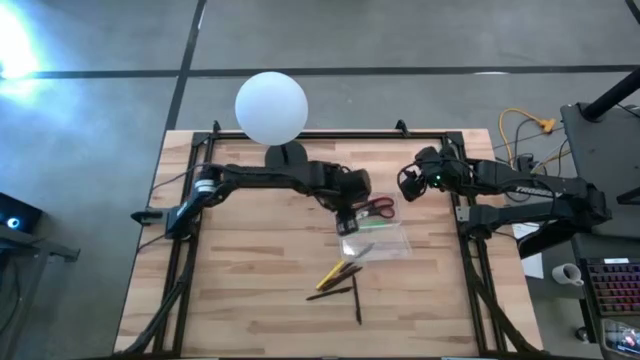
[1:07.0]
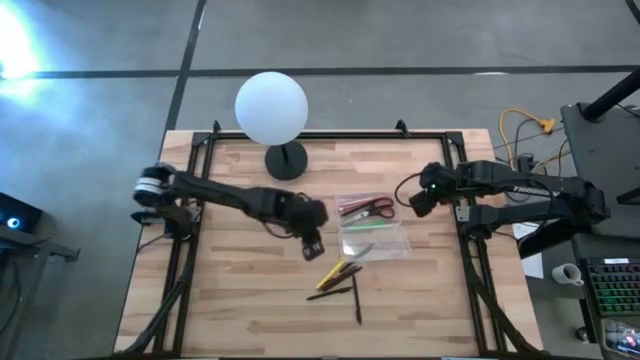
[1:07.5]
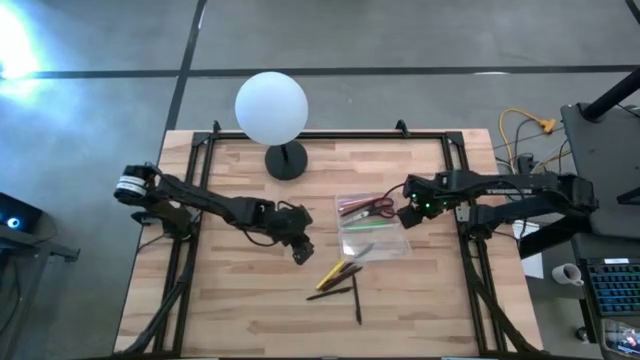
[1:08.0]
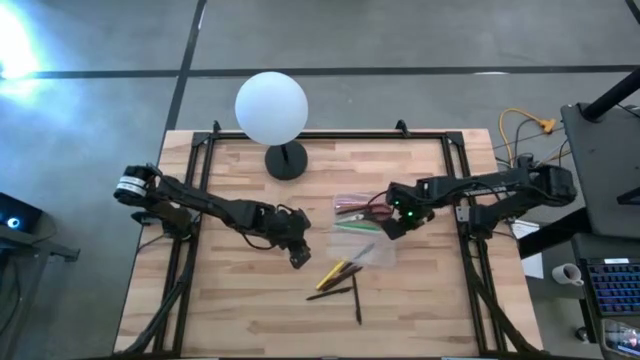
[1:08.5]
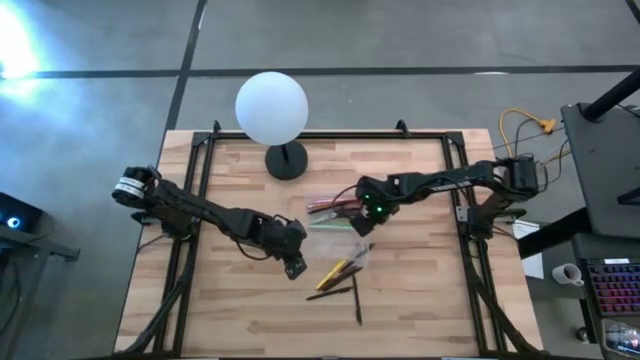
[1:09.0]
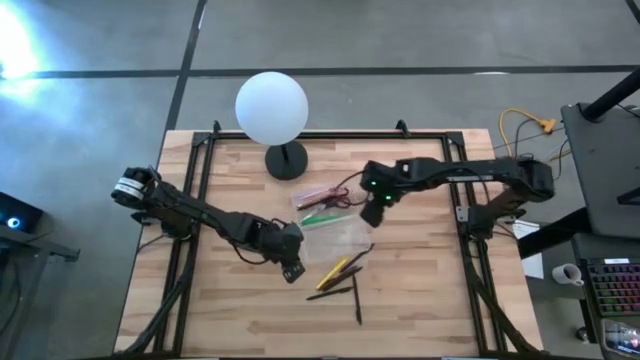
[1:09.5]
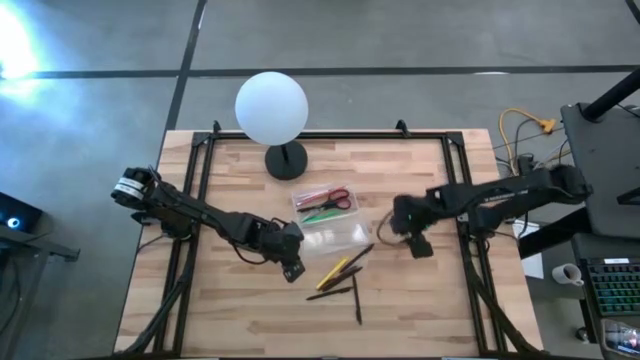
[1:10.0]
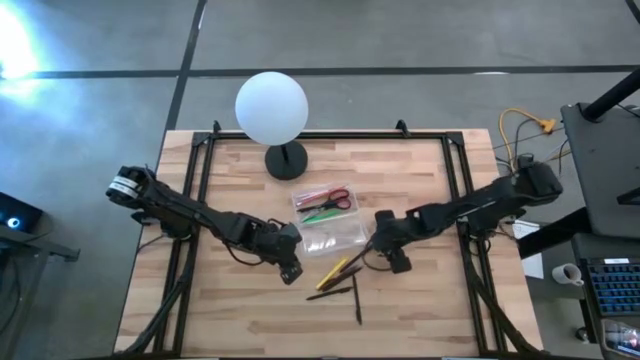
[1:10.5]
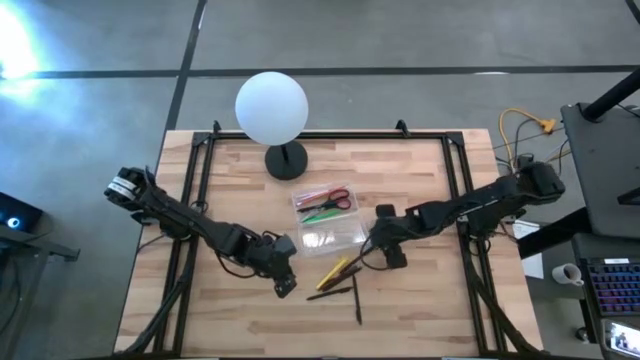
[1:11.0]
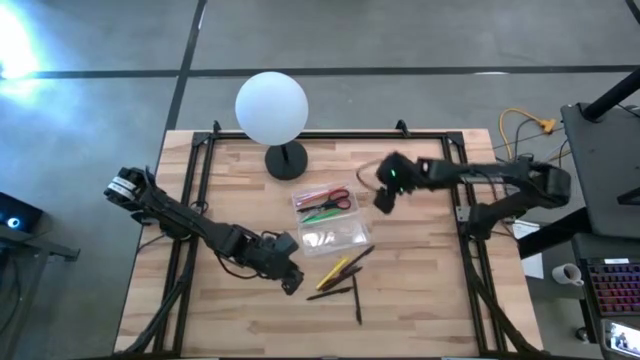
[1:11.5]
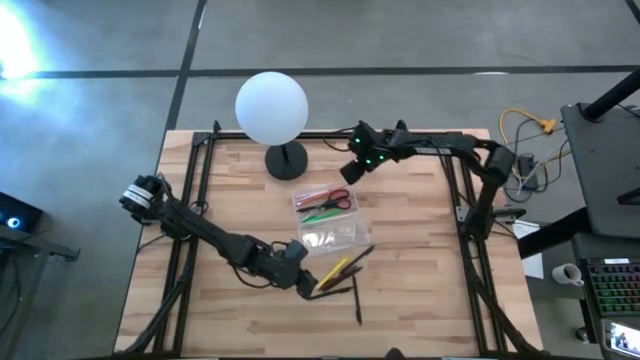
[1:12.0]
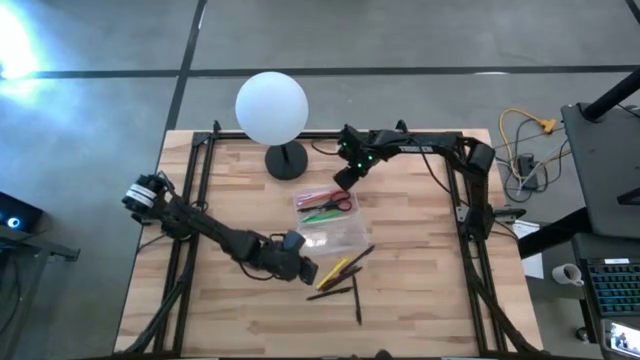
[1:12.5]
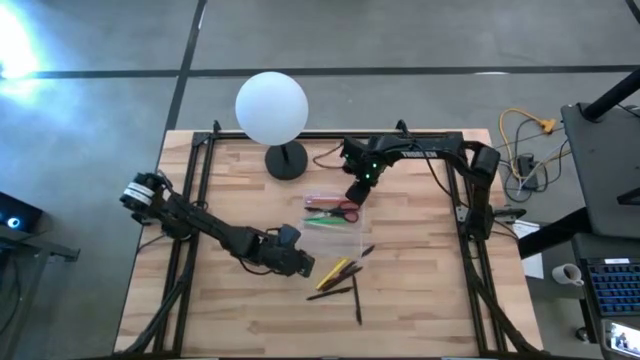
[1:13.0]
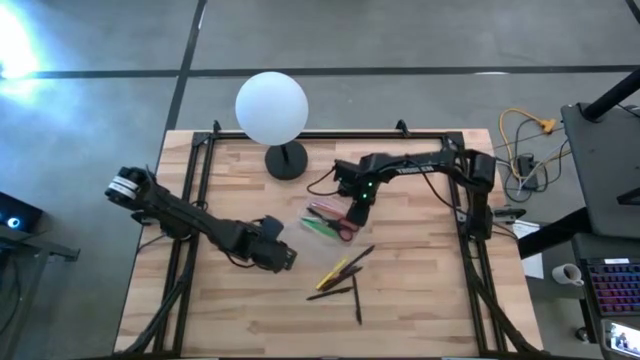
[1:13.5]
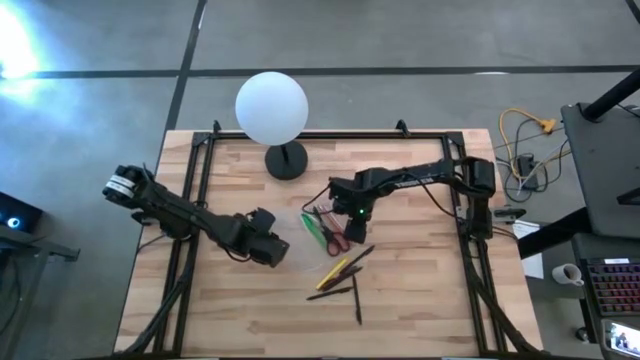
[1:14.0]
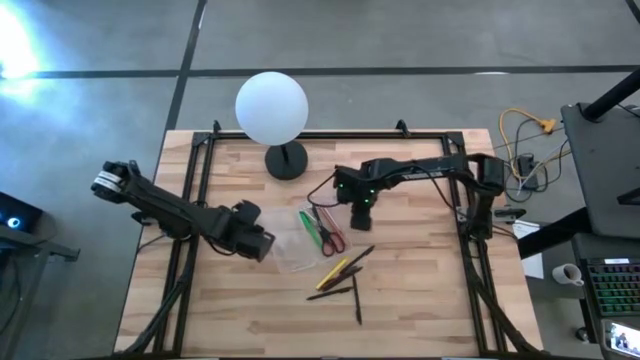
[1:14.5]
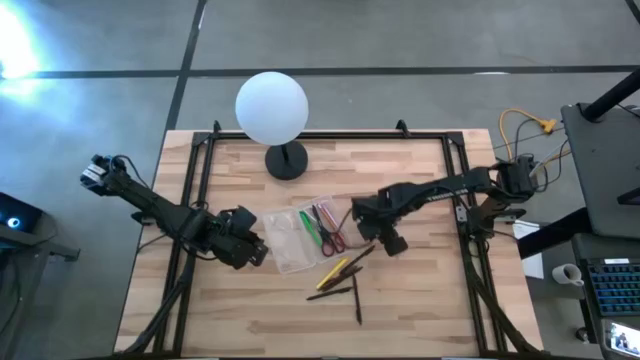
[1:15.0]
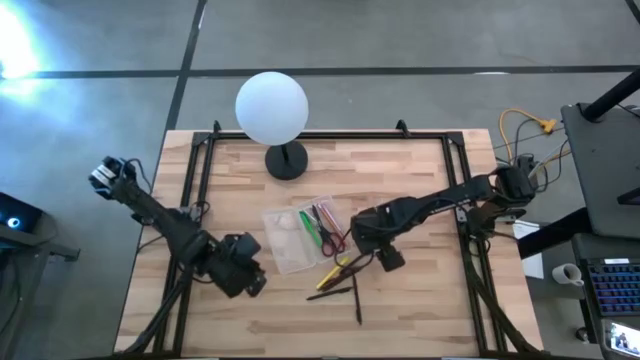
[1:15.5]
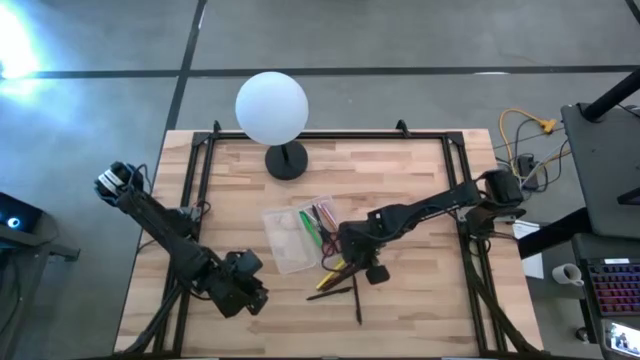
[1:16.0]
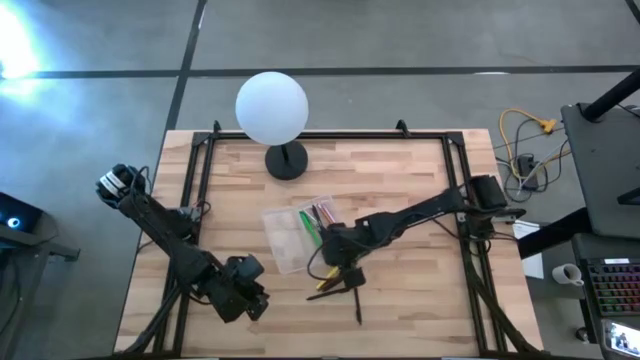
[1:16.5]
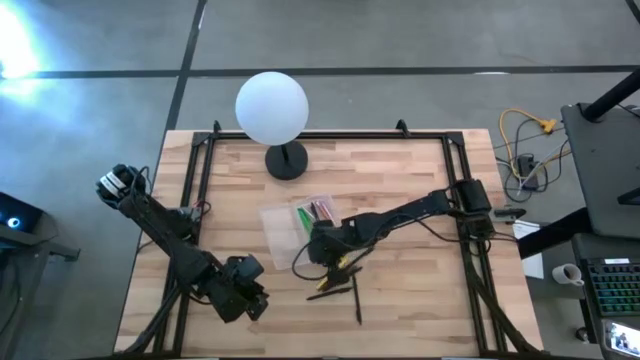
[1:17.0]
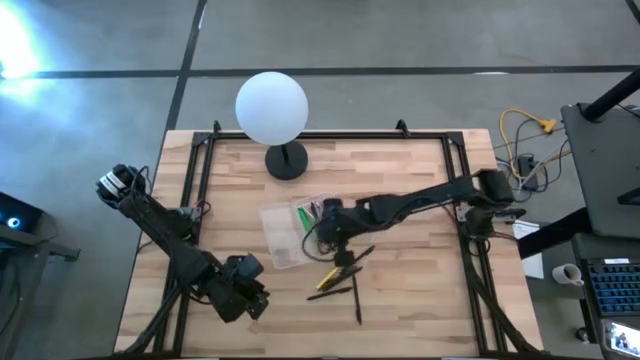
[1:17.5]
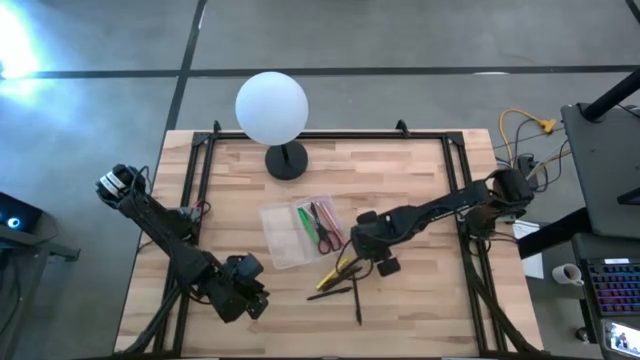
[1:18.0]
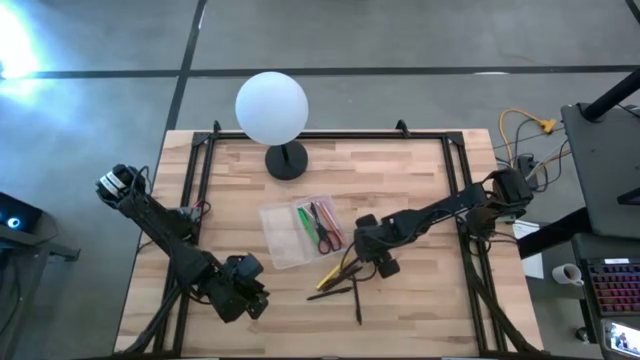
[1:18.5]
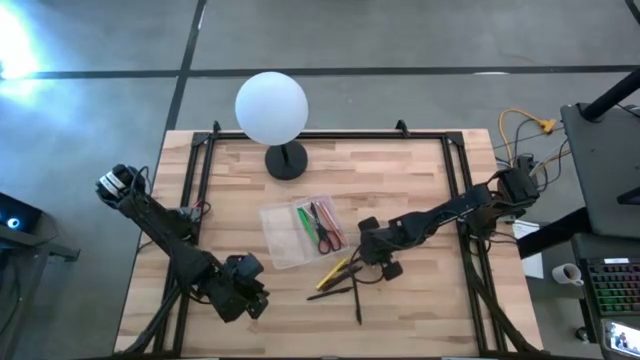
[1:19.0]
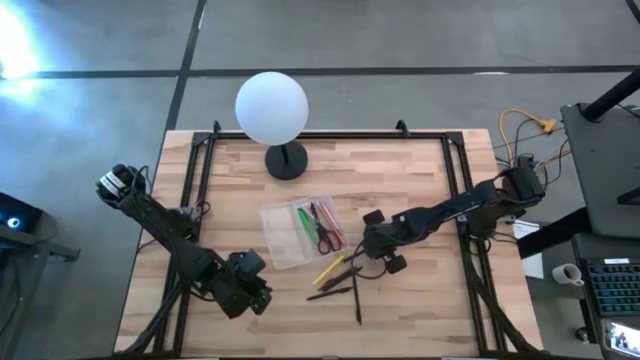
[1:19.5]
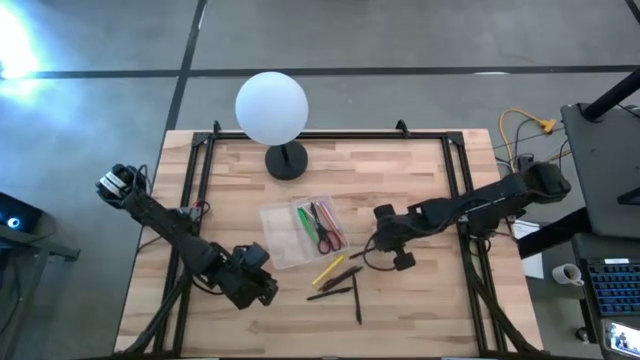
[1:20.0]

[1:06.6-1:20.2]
Task: Pick & place school supplies into a supply box
Put the black ballpen into the supply box

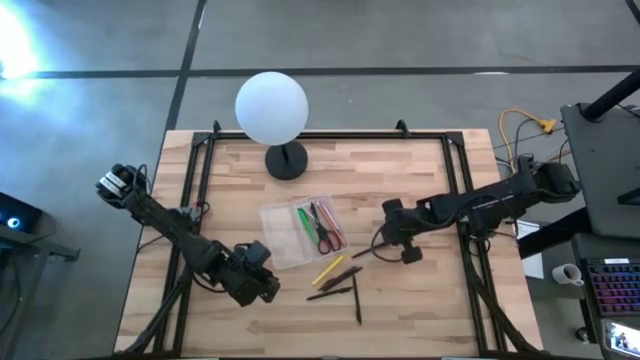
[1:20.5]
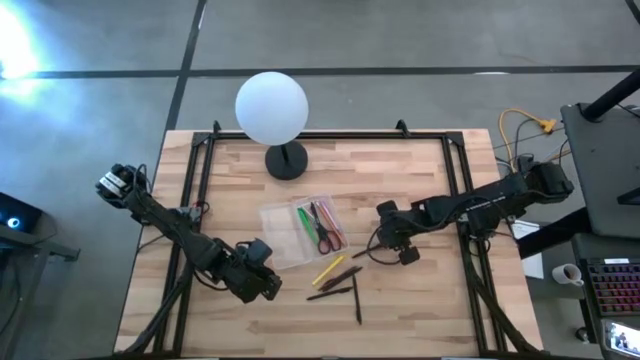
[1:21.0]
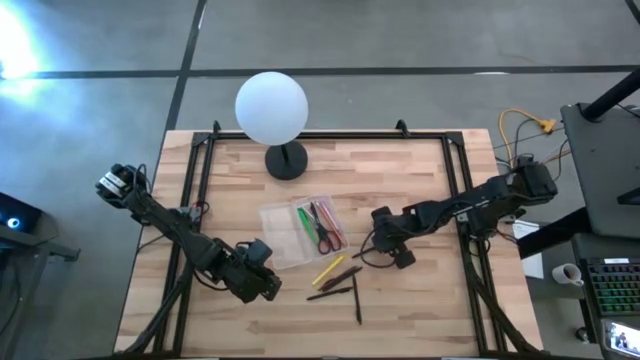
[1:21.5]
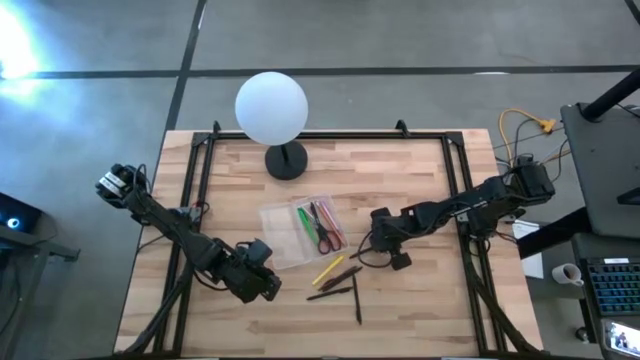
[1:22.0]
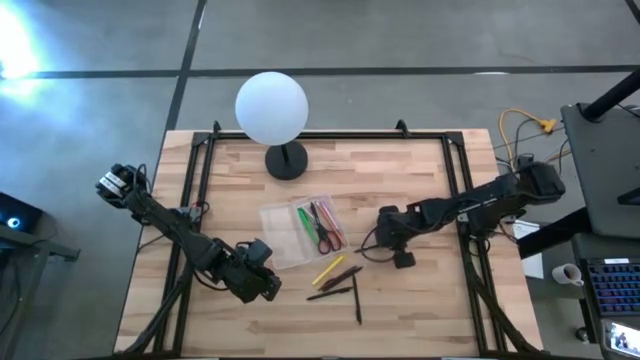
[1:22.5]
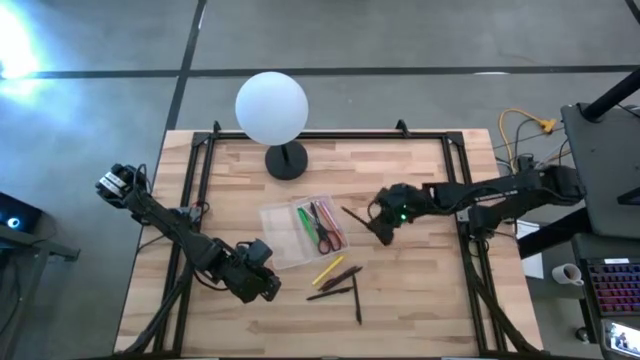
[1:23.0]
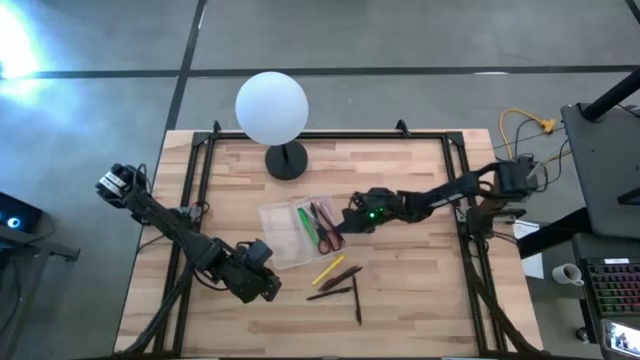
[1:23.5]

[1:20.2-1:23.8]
Put the black ballpen into the supply box

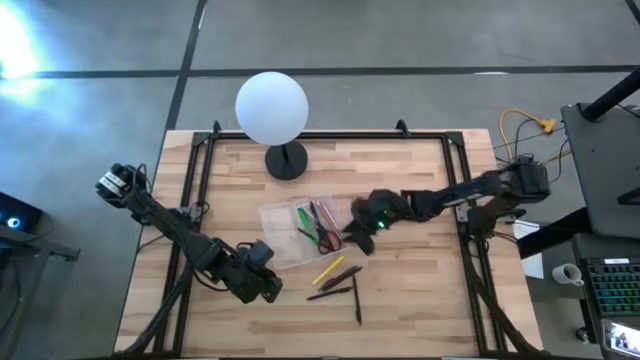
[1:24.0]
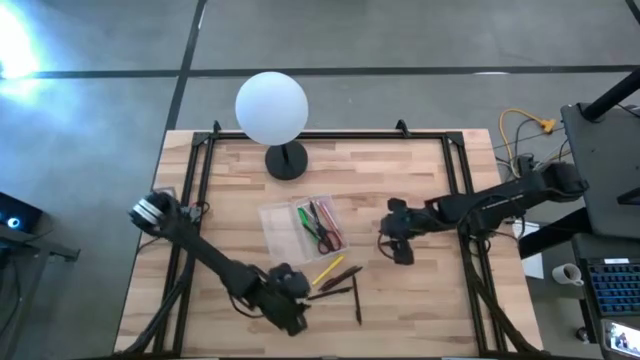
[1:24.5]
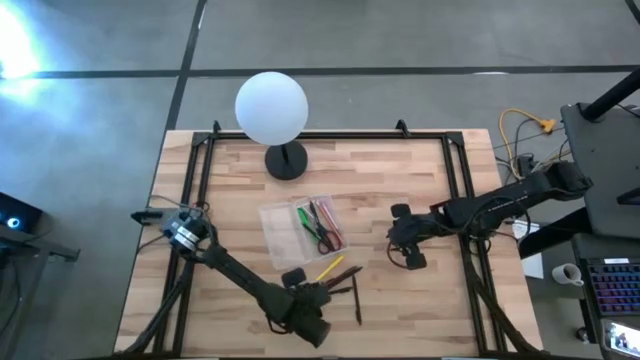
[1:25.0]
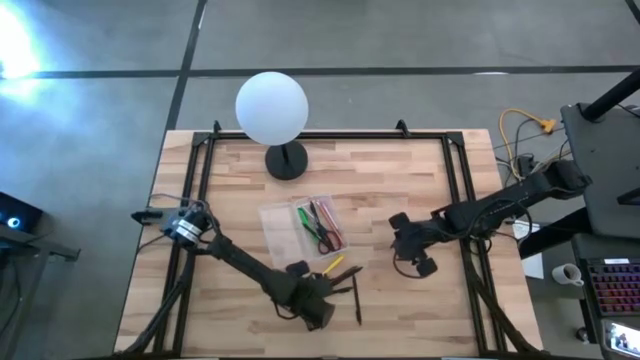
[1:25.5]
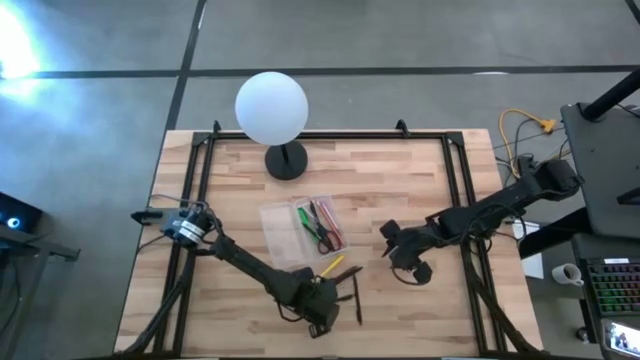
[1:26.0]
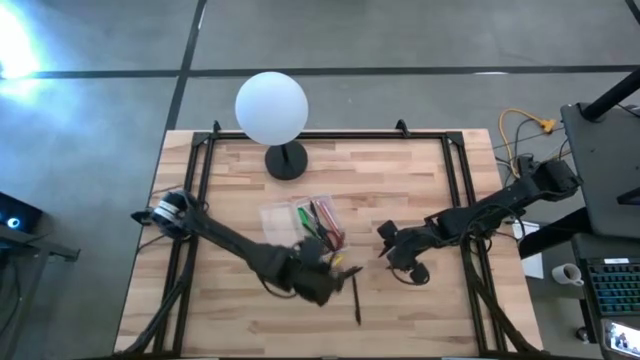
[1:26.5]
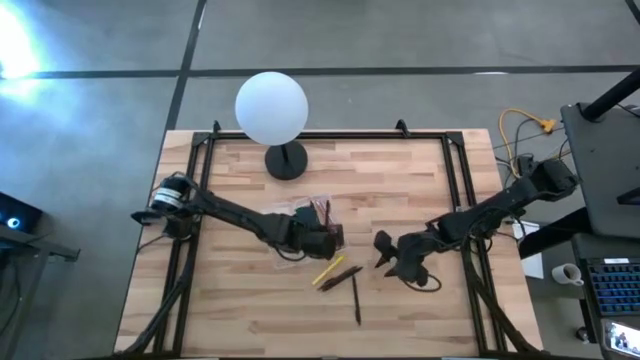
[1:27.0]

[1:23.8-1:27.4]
Put the black ballpen into the supply box

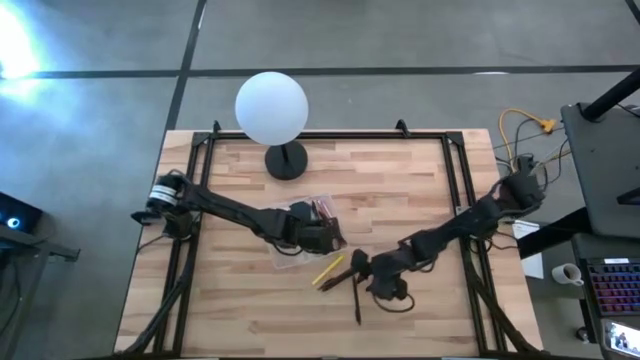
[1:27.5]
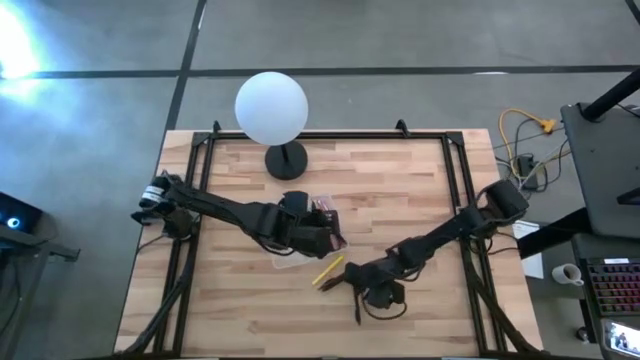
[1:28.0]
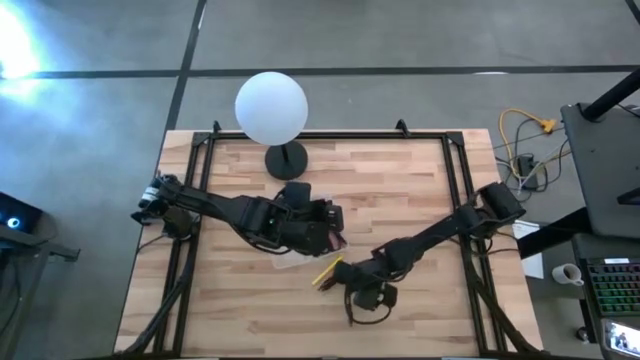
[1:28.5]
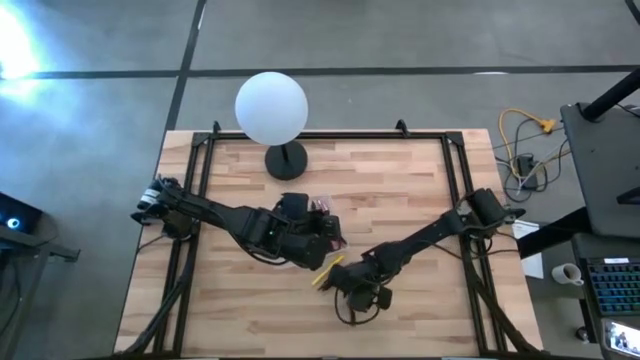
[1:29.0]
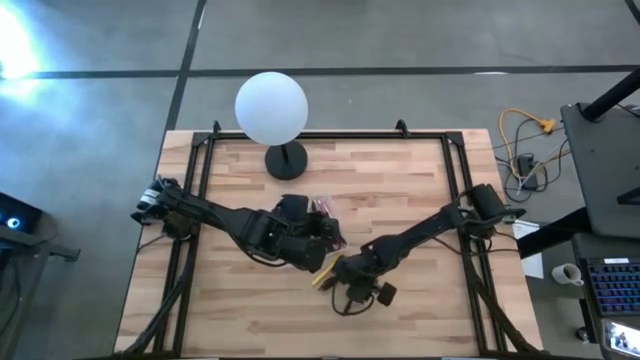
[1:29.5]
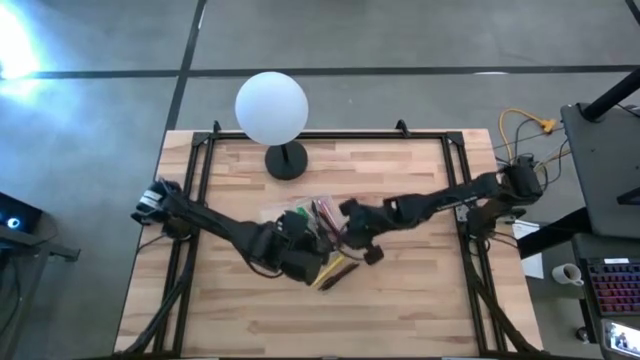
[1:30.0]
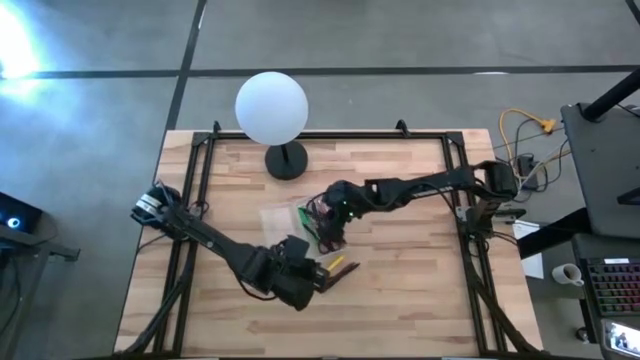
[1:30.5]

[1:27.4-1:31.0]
Put the black ballpen into the supply box
